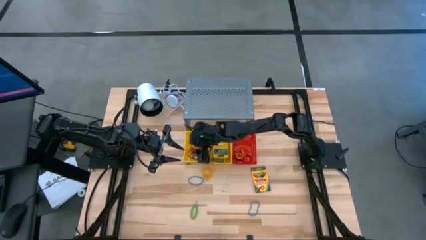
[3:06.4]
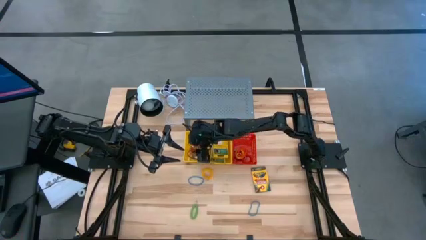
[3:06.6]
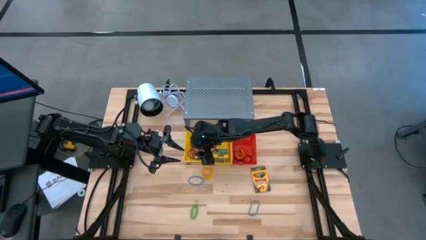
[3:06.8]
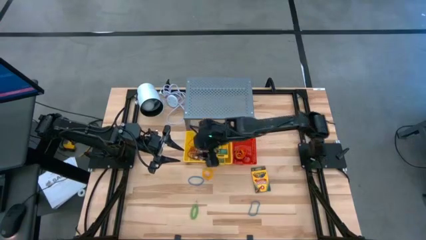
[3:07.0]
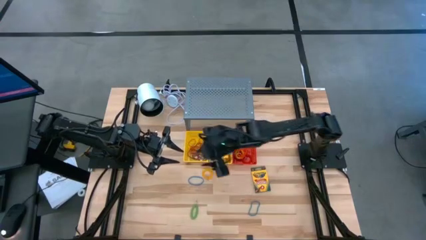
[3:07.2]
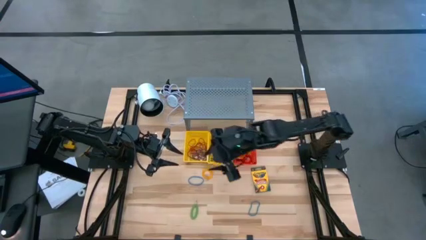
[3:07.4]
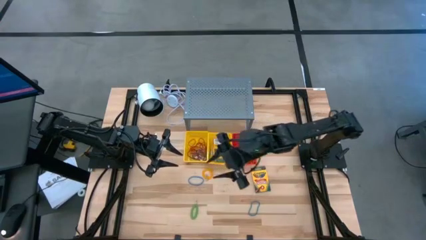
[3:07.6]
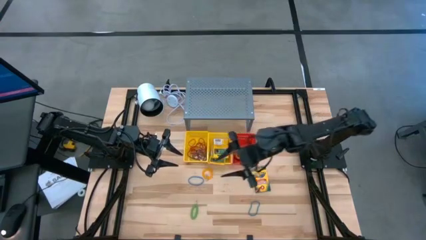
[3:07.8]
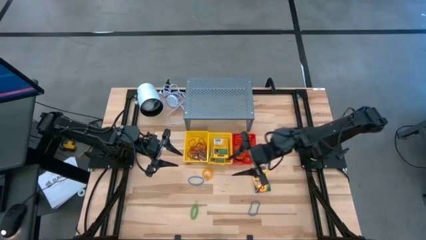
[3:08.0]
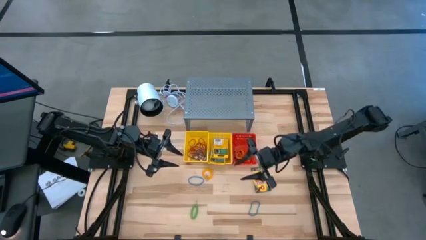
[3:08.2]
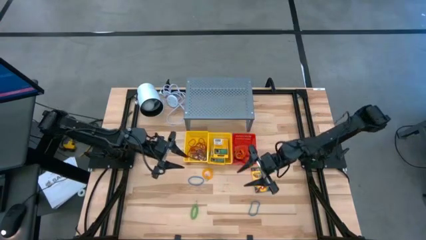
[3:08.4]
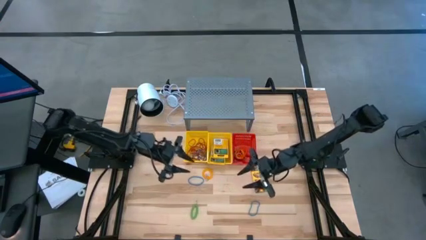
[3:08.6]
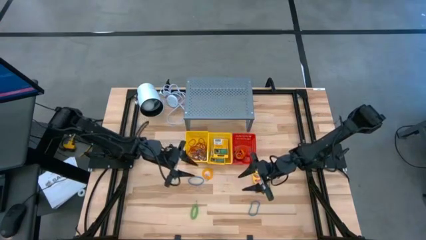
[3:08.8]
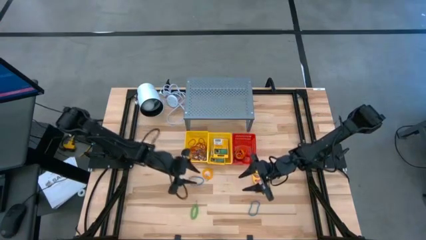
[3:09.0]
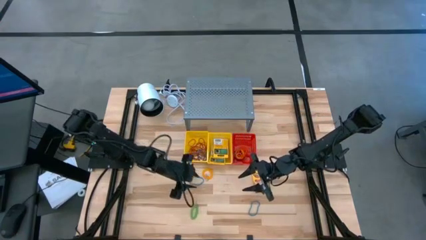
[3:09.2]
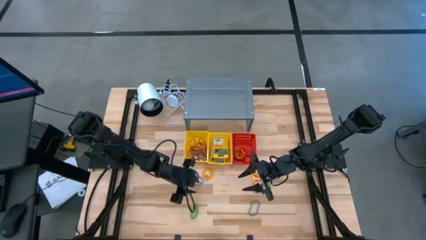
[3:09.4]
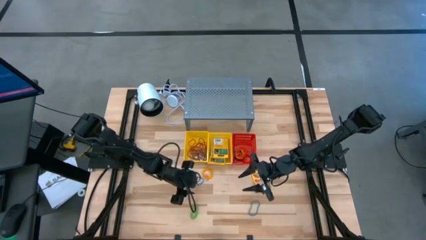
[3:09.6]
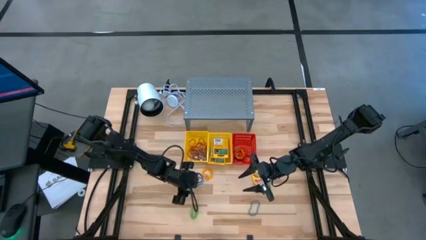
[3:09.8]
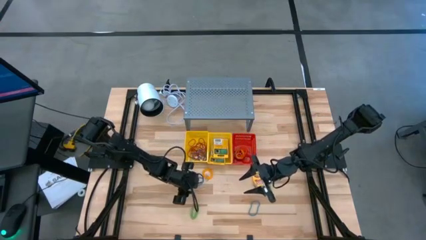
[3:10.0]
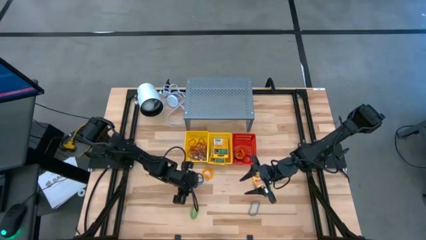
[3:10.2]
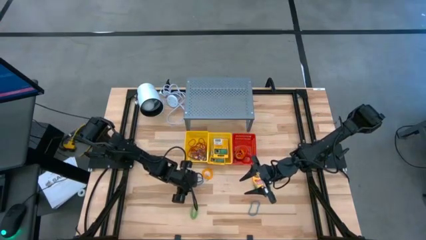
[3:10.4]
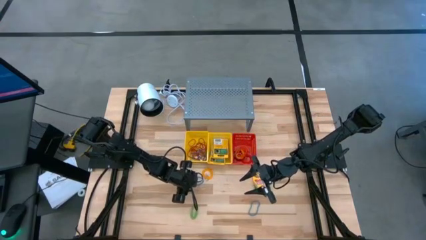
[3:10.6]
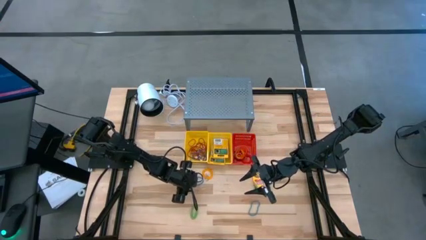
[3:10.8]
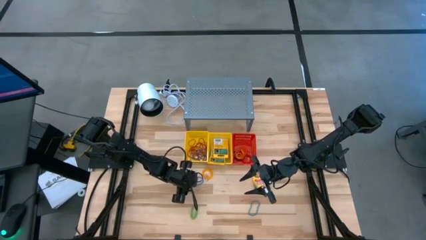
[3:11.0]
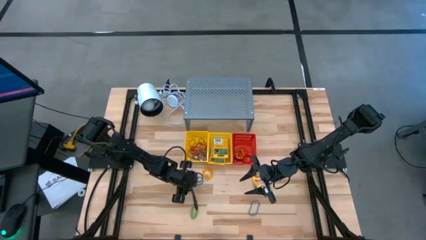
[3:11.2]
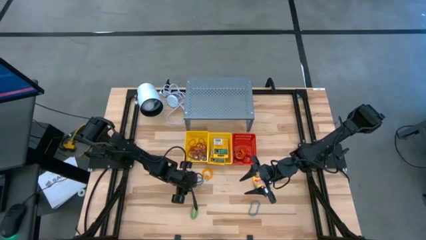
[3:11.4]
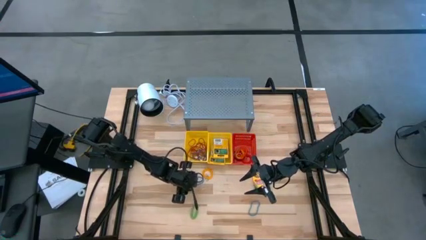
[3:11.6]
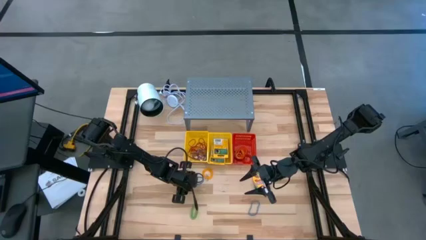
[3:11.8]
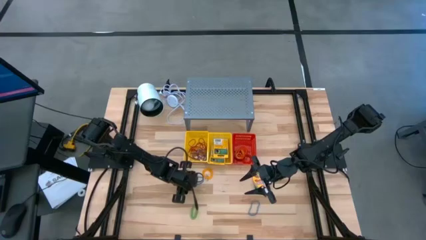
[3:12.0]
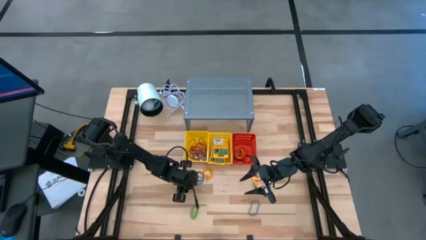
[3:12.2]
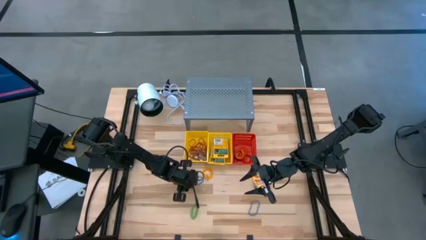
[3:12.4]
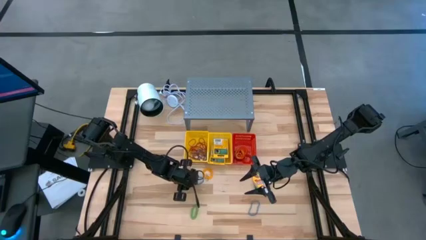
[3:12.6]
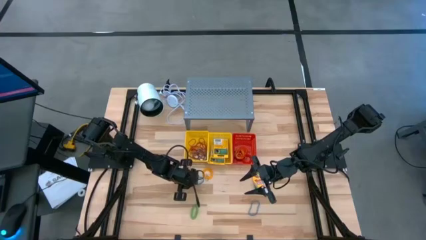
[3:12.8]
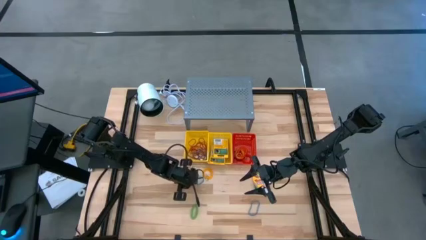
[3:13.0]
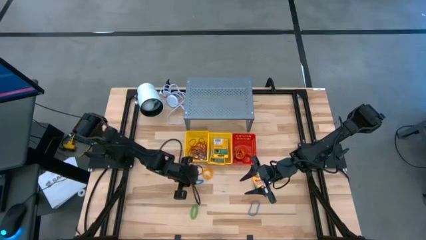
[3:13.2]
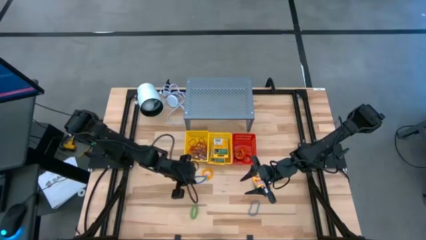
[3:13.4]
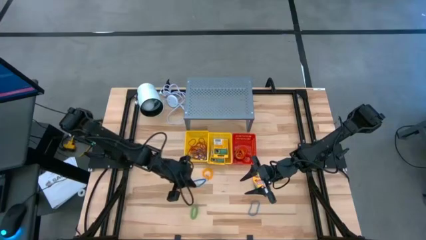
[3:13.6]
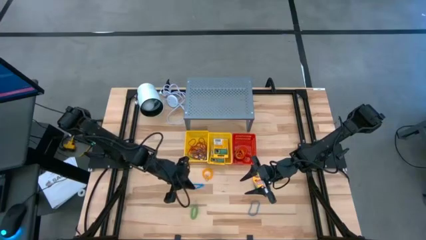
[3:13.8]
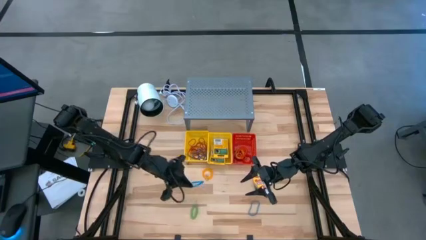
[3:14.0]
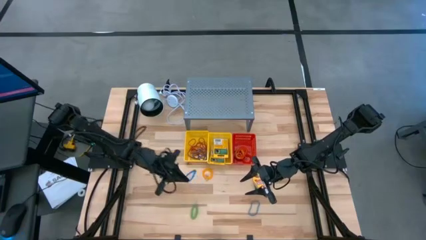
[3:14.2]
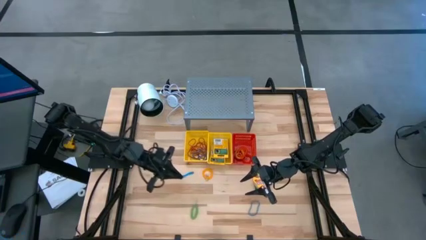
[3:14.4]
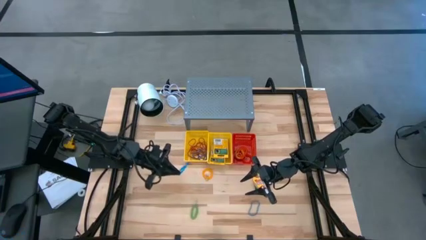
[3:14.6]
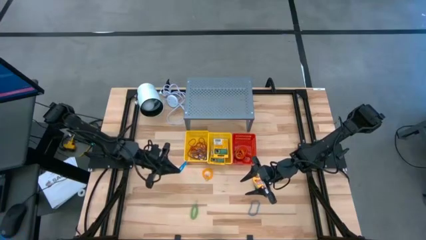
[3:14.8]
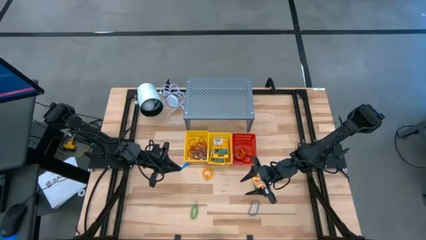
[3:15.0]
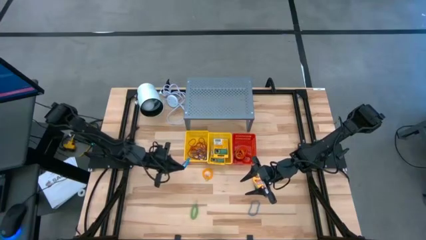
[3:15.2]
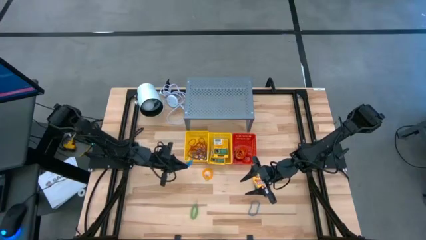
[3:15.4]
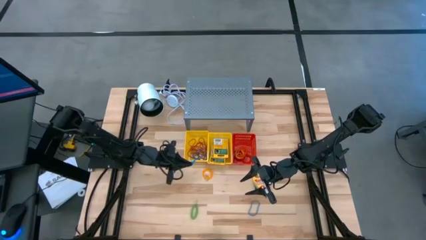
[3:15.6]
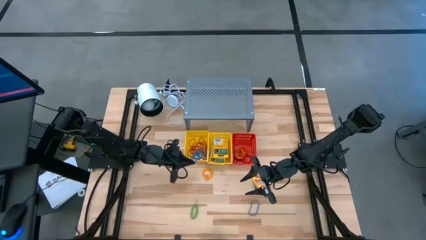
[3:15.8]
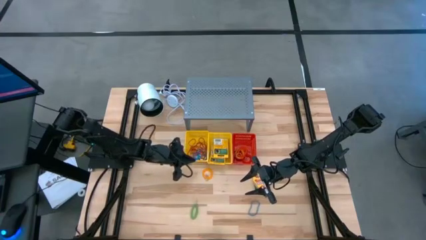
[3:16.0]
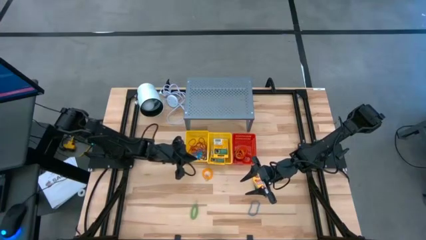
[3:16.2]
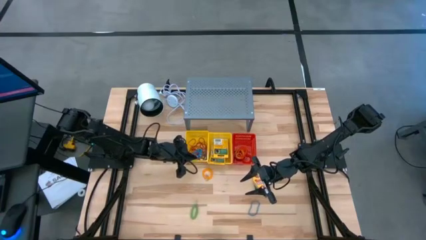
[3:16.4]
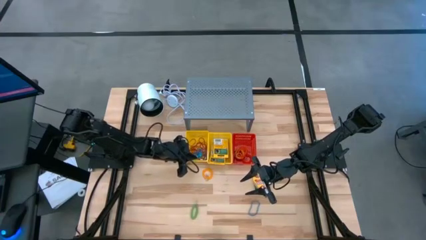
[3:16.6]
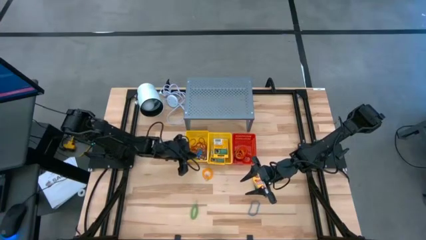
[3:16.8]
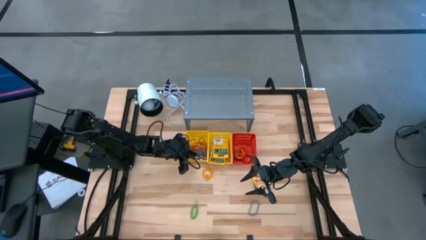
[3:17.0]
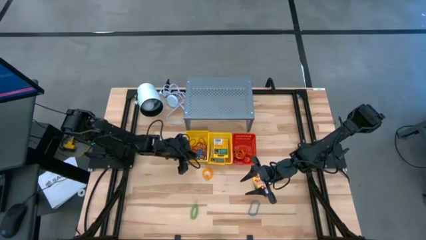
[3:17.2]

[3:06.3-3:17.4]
Task: Pick & Place Office Desk Supplies
Put the blue rubber band into the left yellow basket

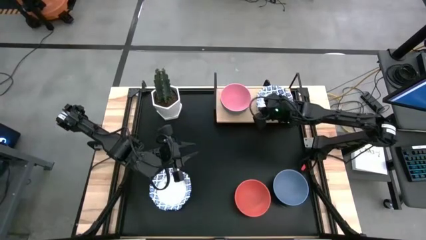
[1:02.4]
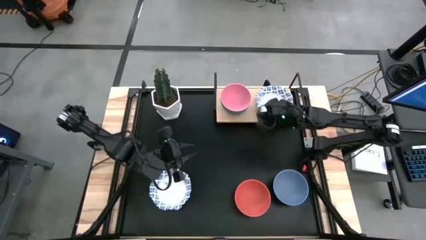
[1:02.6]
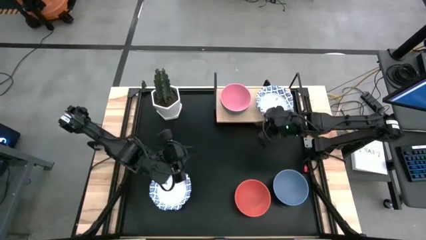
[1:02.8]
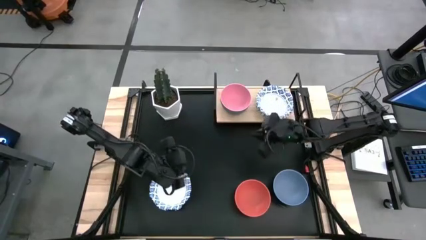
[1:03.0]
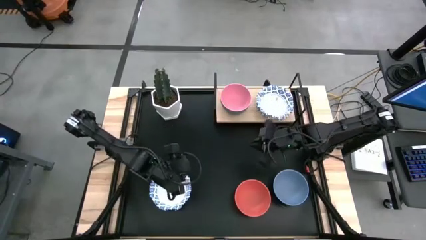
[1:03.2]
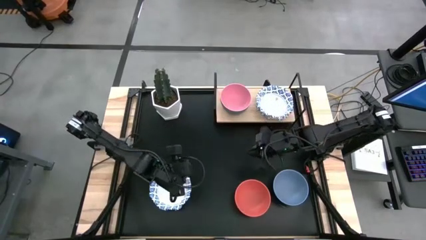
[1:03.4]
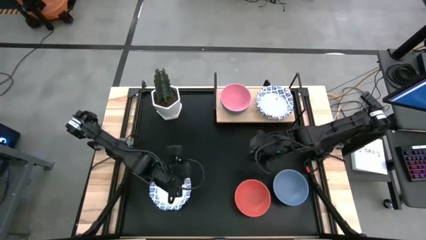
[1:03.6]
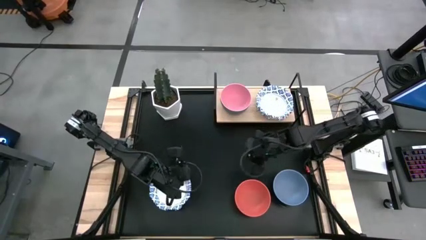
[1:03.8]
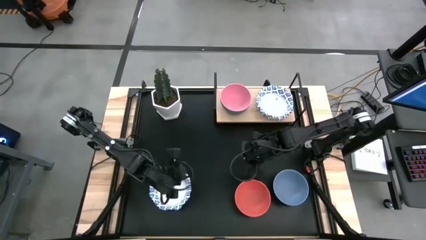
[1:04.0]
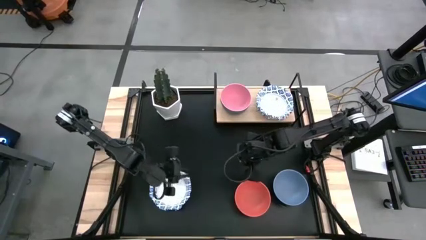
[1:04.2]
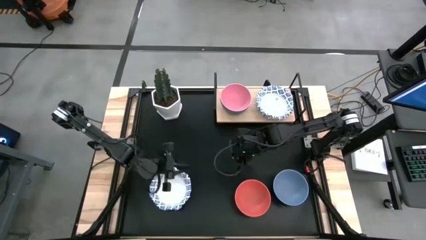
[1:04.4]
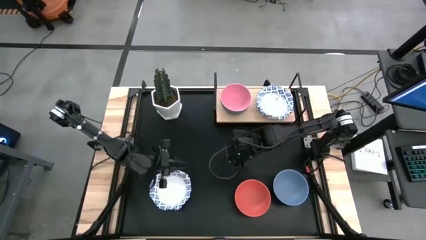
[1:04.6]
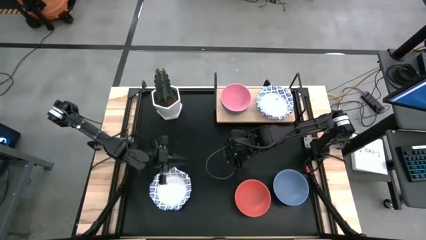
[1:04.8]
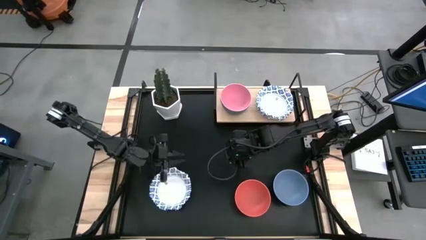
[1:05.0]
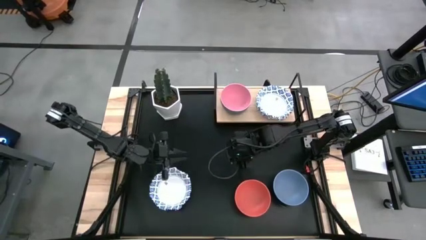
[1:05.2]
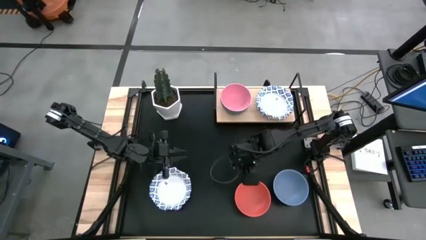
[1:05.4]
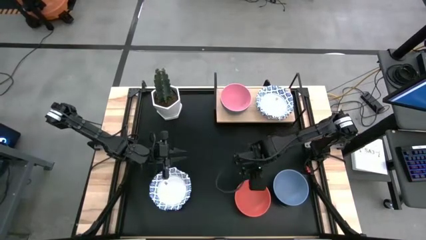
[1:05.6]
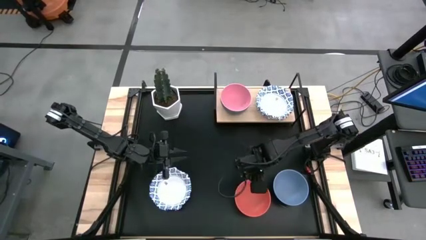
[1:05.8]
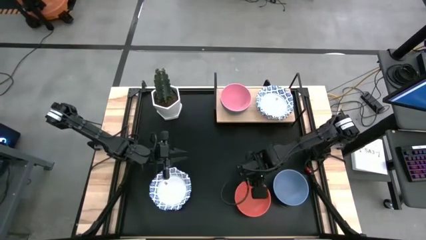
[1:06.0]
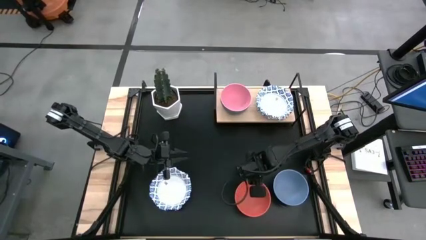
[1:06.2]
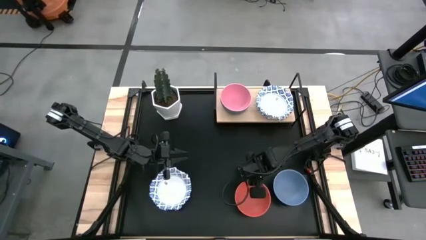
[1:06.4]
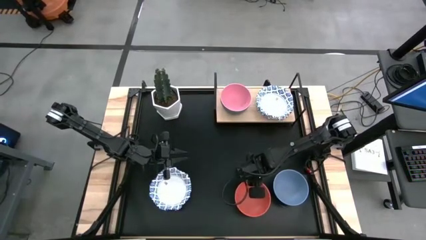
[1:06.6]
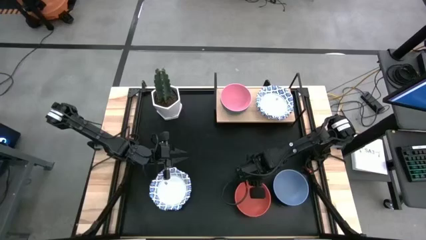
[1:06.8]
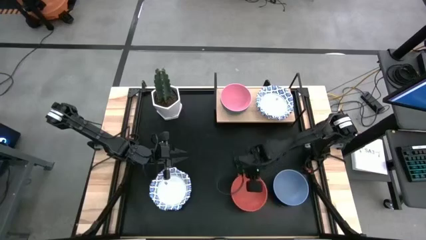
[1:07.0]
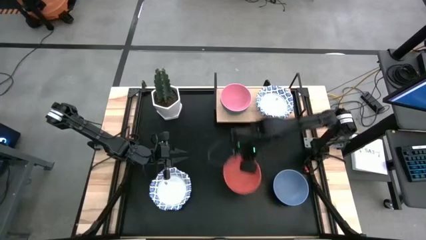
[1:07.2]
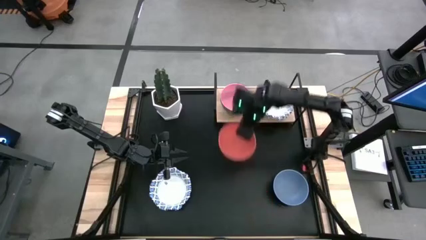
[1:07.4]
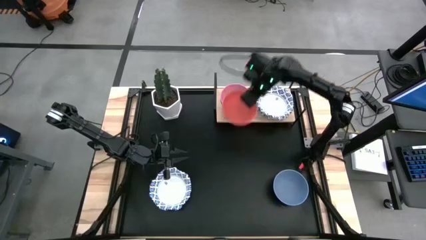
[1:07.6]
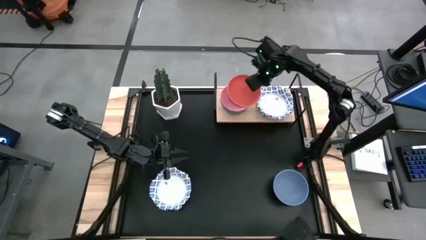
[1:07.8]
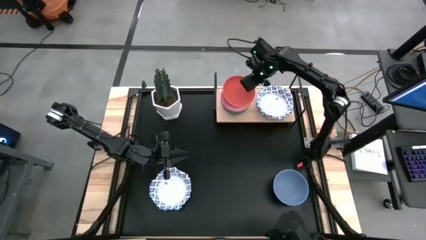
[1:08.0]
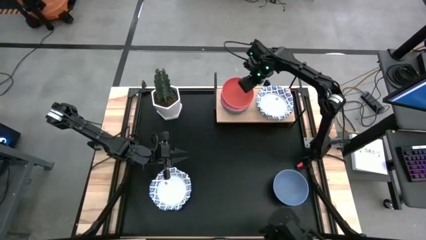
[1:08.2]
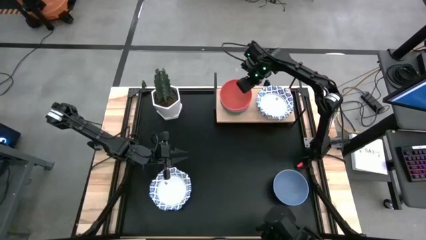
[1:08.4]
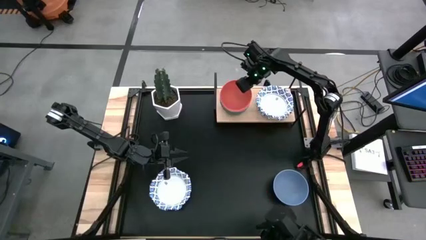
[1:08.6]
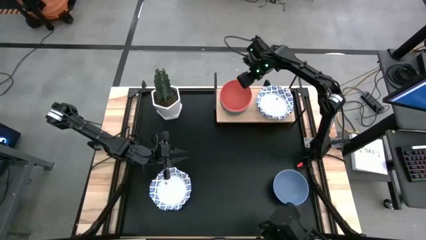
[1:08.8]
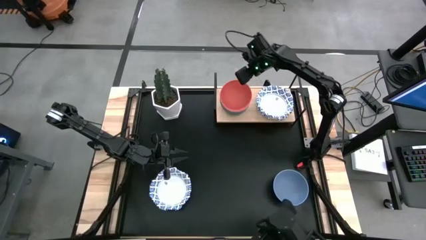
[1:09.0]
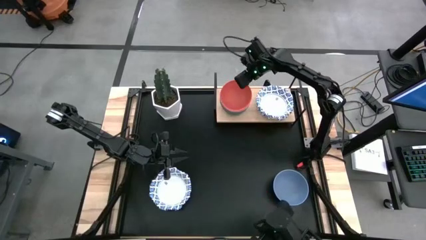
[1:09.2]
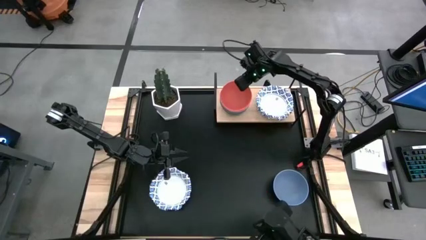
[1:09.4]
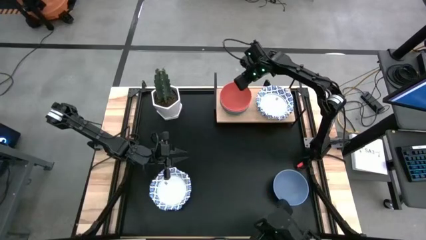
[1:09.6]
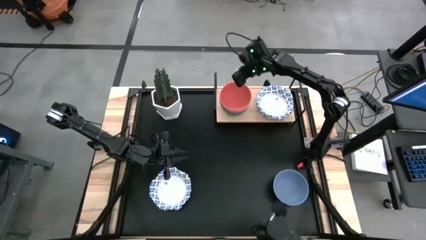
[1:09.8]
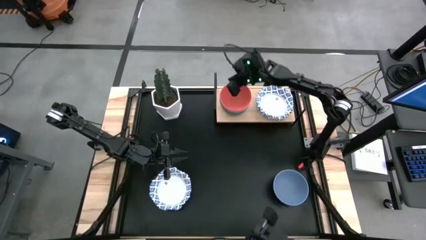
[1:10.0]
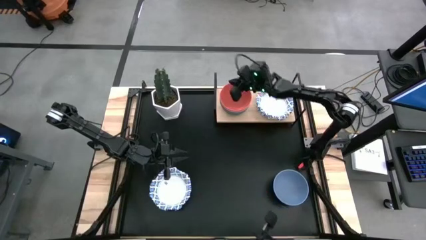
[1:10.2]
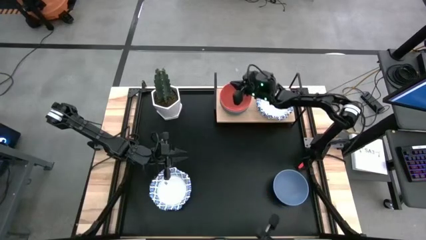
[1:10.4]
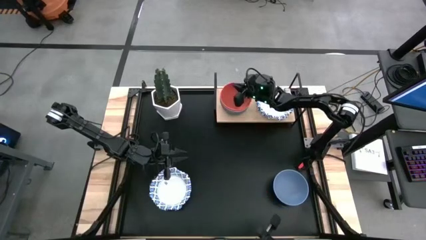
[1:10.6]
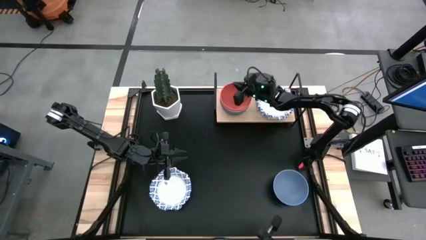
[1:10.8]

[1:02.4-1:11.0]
Task: Place and stack bowls onto a shelf
Stack the orange bowl on top of the pink bowl on the shelf
